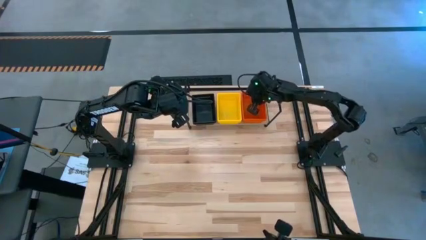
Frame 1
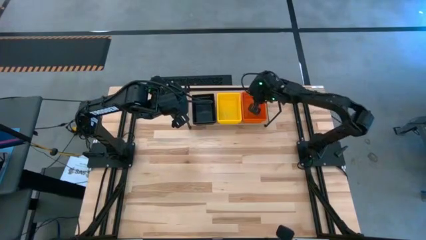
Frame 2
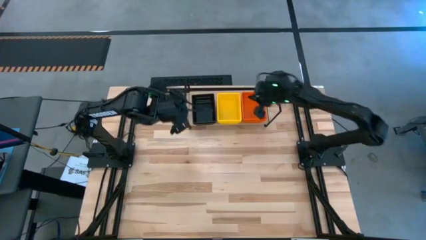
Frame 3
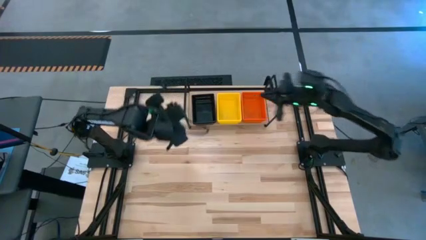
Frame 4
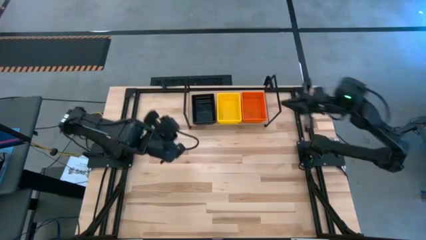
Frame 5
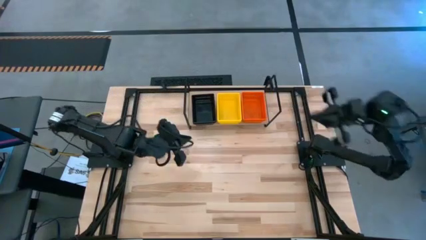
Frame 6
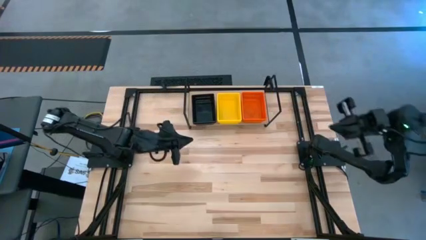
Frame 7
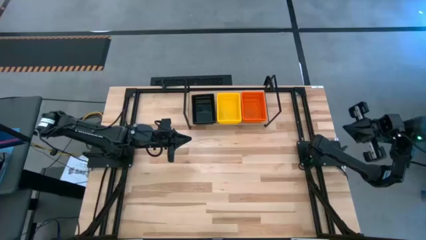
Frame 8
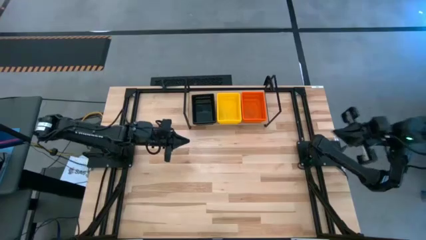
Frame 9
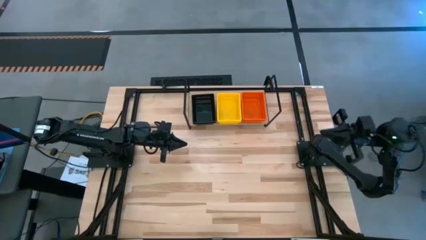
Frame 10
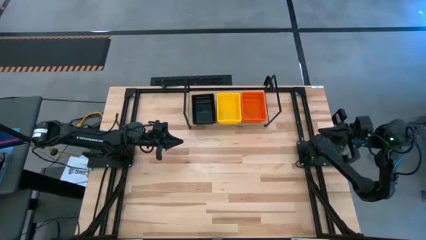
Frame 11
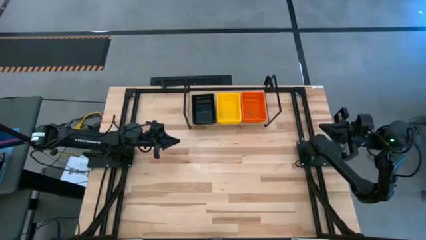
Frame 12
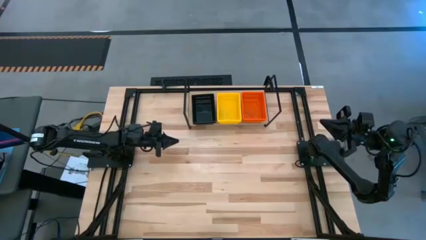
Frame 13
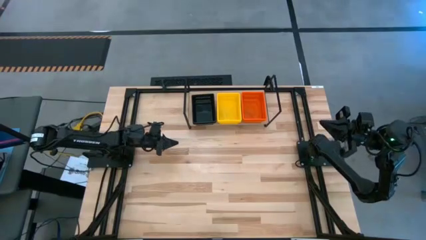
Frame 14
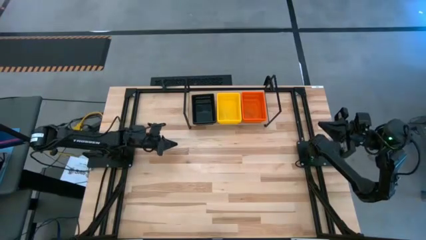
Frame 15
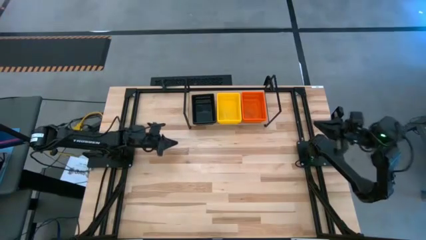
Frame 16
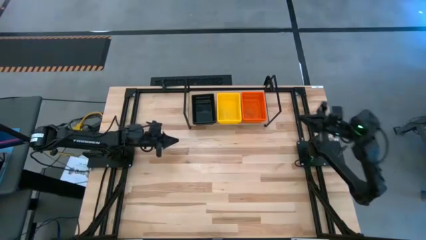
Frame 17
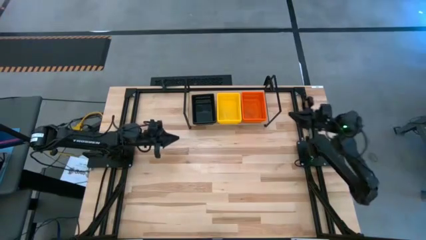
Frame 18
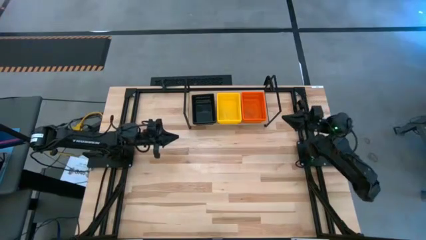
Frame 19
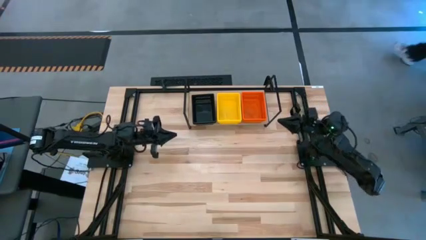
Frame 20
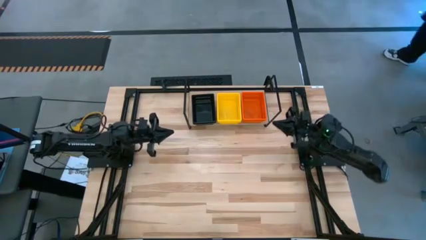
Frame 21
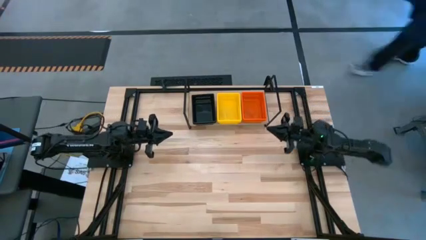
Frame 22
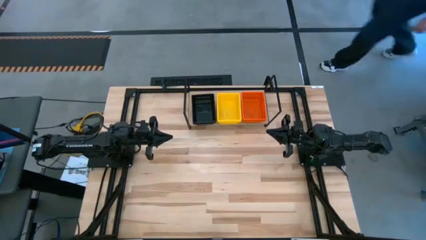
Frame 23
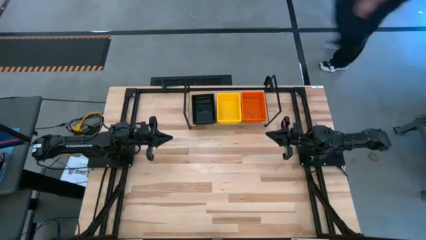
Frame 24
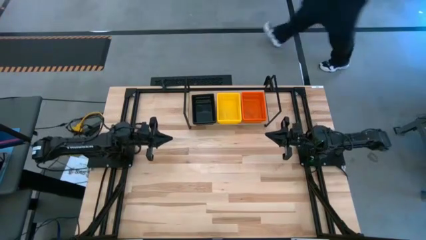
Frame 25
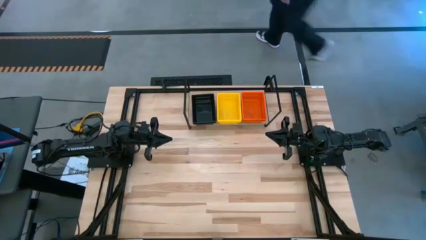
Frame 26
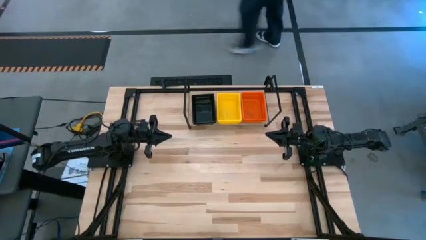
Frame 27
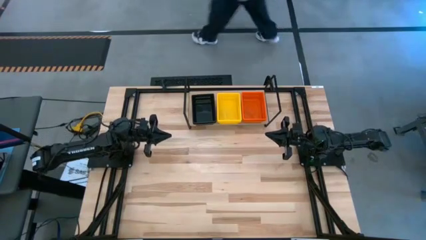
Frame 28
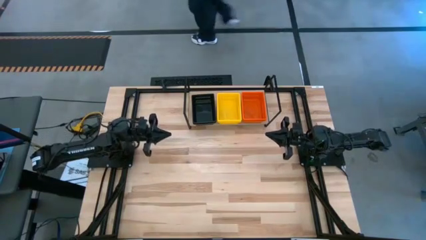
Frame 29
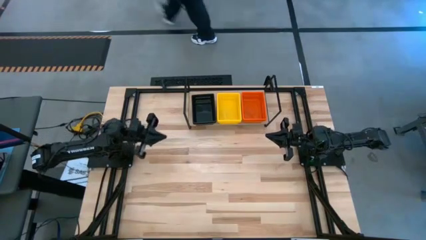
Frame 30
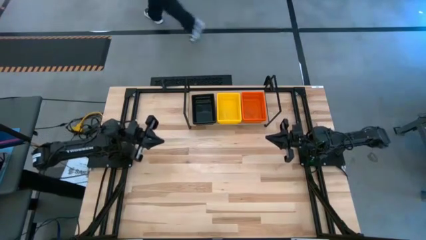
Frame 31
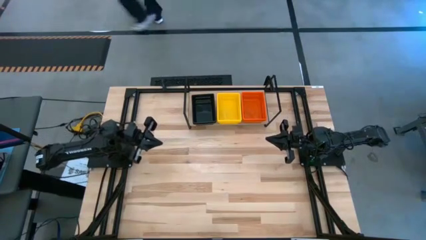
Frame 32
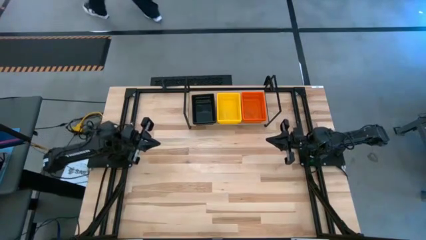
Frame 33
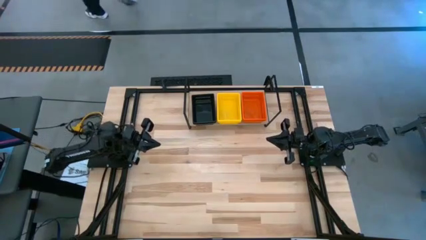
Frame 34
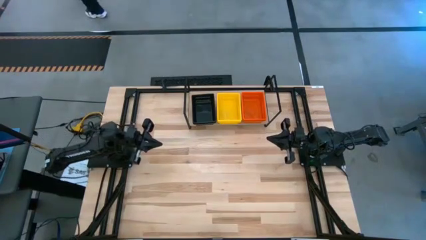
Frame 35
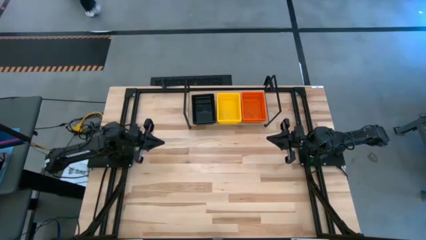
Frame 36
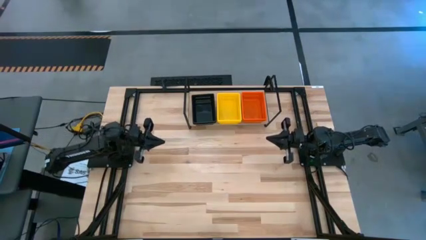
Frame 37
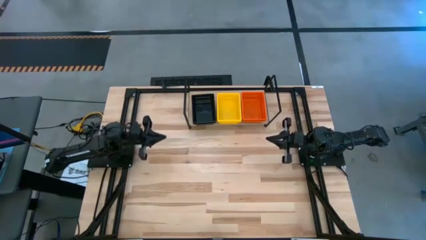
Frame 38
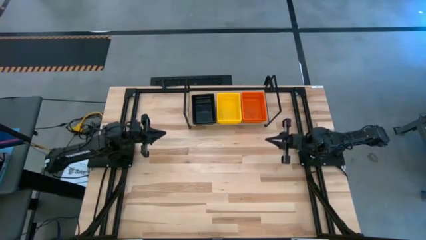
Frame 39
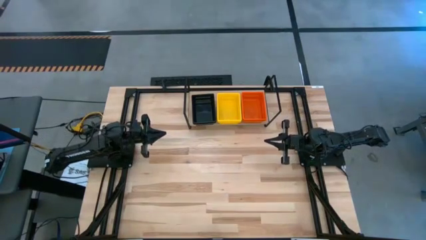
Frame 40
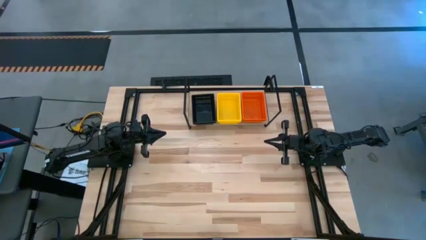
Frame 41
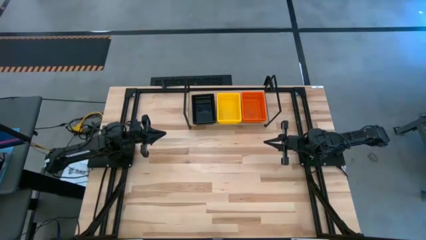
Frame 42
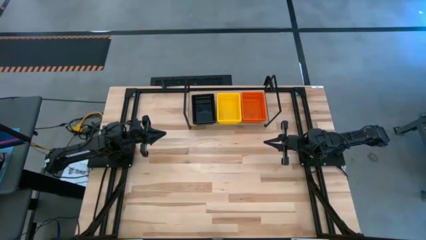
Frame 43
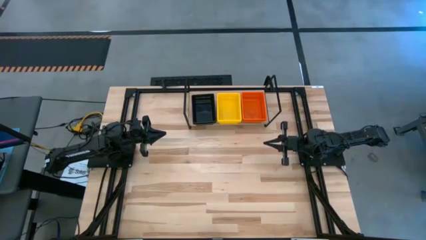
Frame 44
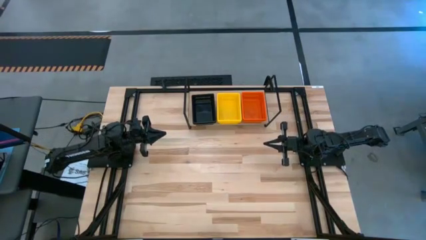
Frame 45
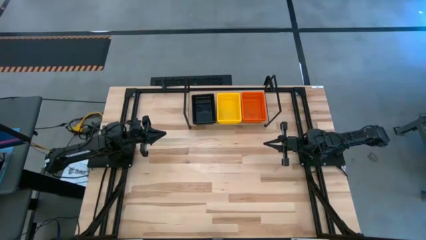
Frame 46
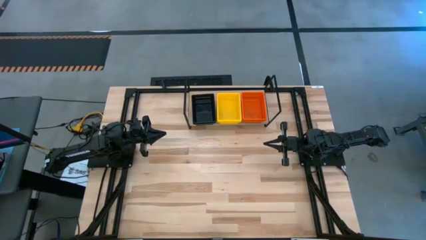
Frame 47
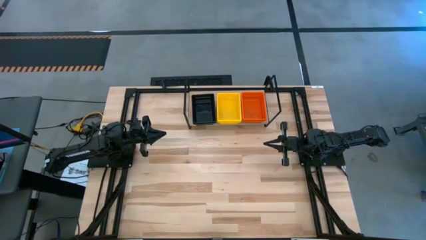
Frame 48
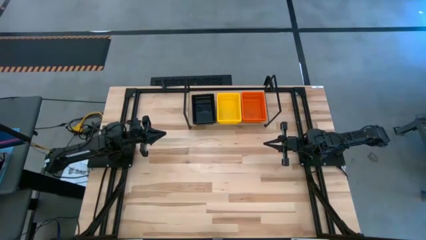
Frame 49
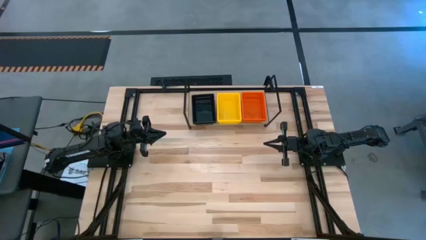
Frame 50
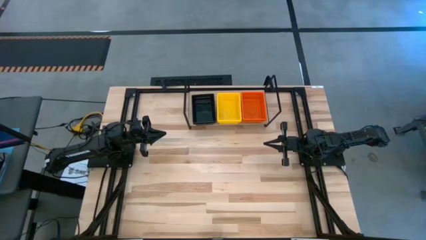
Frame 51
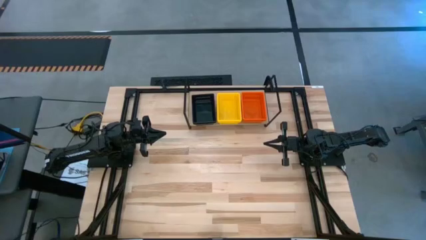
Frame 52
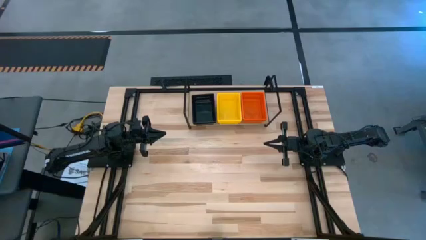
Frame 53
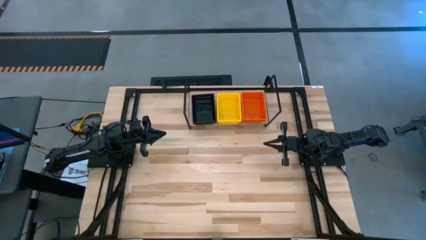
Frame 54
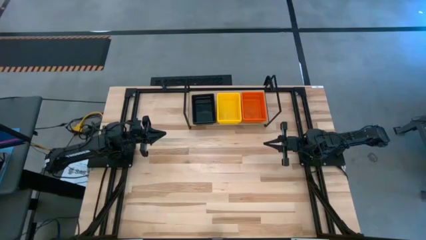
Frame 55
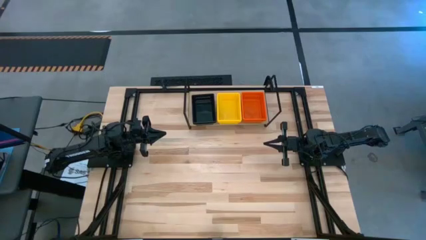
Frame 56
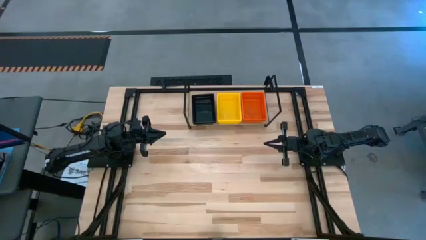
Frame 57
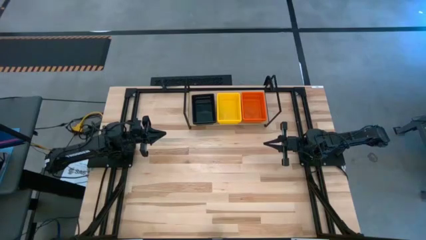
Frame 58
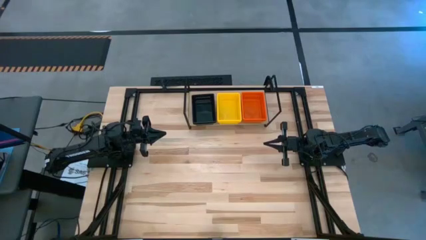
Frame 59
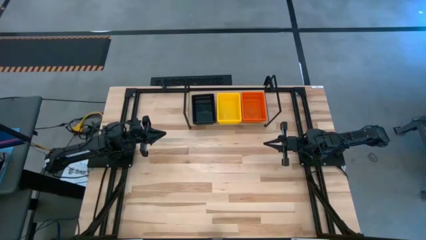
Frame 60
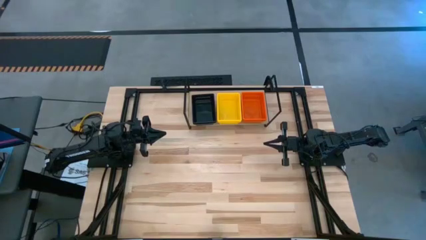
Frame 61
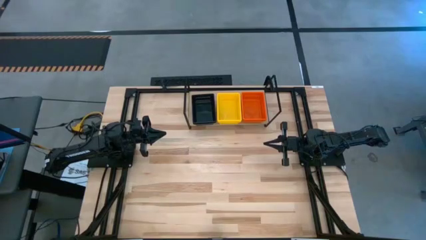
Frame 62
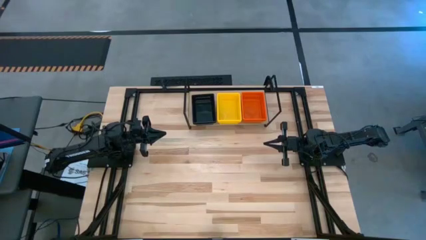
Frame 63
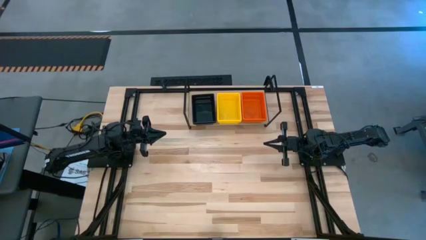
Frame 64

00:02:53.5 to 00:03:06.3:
Task: Stack baskets on shelf by color
Return to Home Position

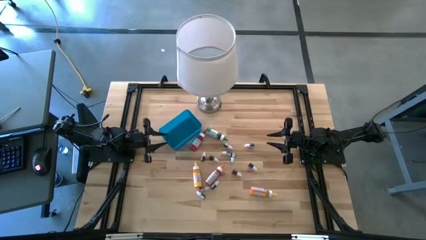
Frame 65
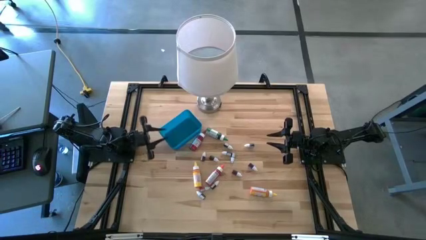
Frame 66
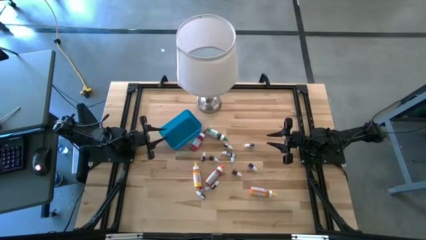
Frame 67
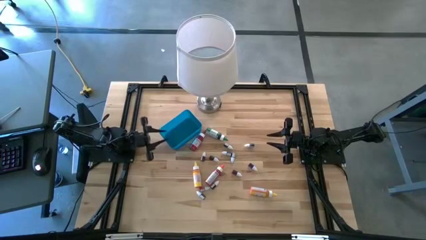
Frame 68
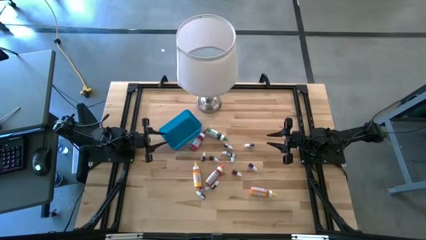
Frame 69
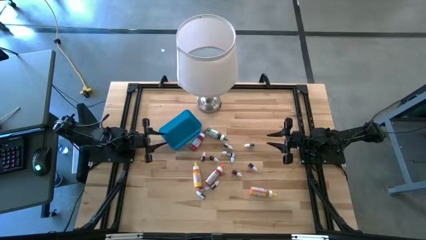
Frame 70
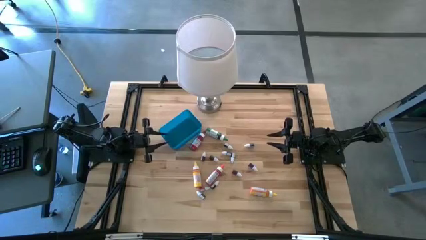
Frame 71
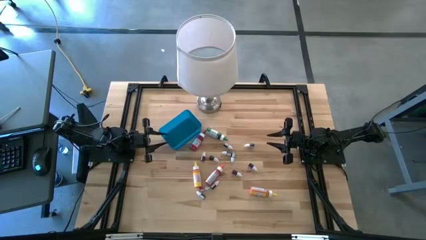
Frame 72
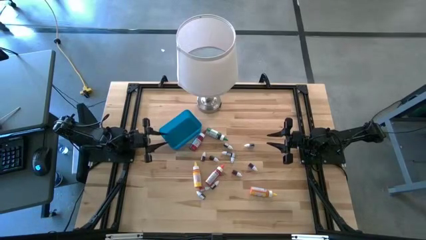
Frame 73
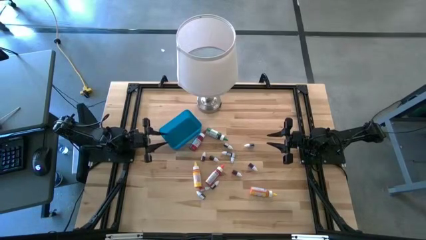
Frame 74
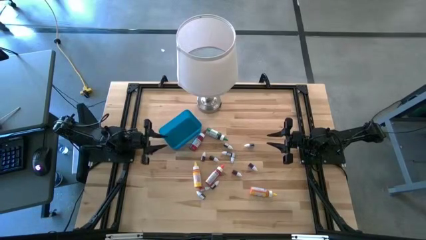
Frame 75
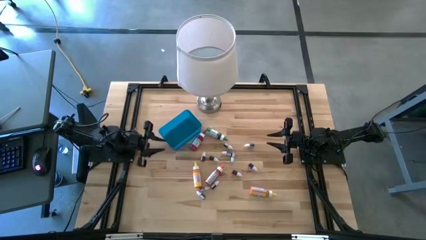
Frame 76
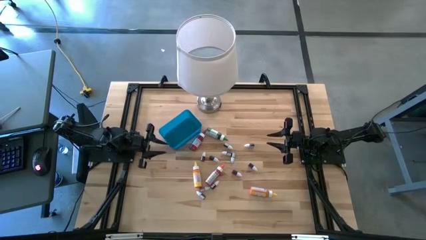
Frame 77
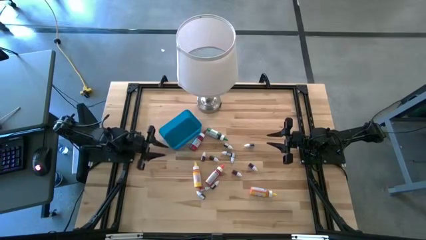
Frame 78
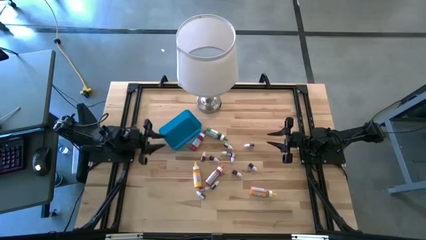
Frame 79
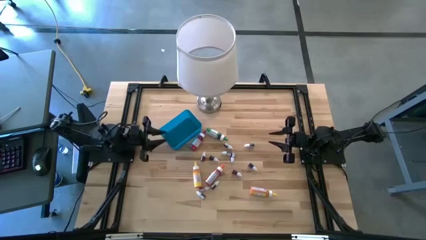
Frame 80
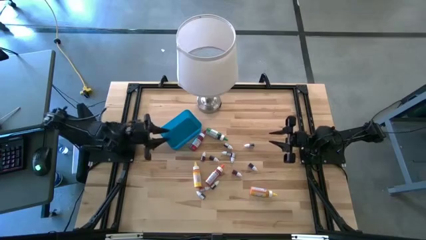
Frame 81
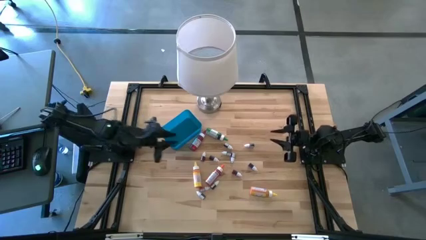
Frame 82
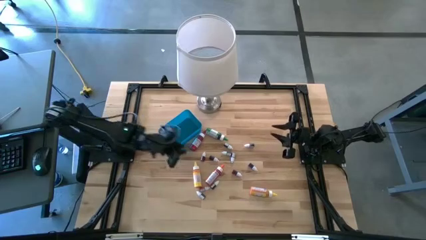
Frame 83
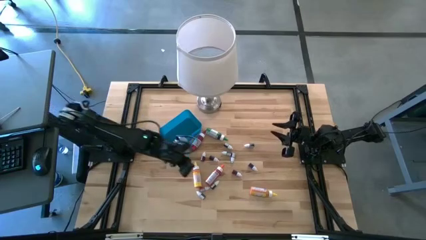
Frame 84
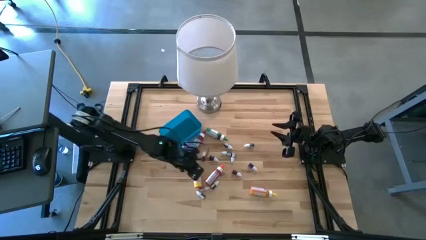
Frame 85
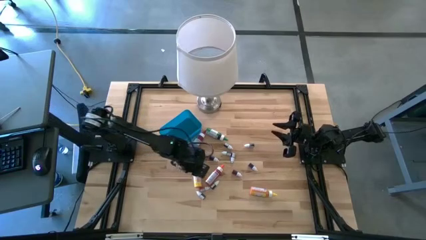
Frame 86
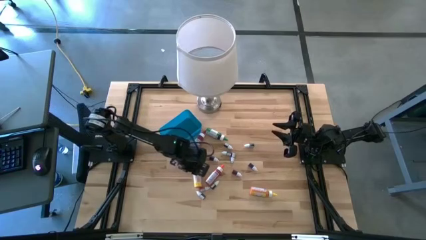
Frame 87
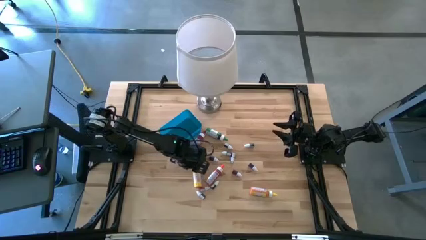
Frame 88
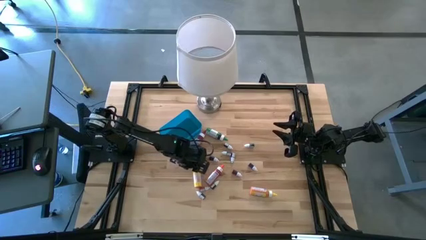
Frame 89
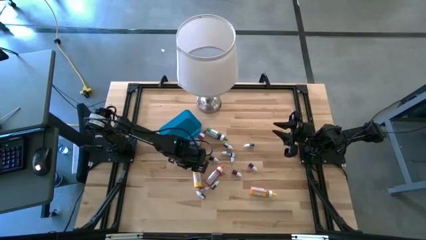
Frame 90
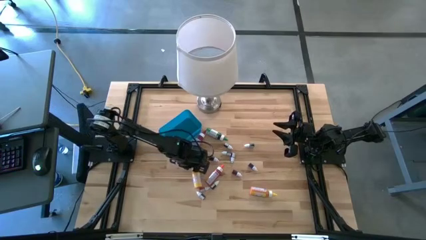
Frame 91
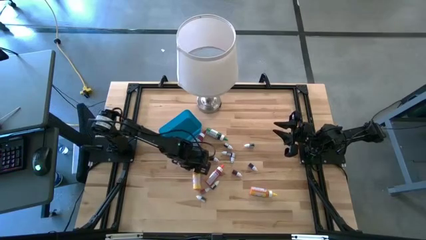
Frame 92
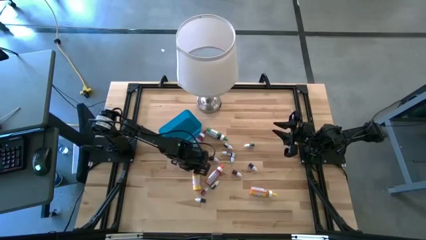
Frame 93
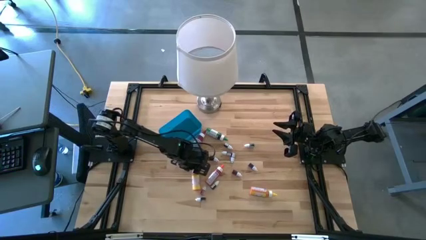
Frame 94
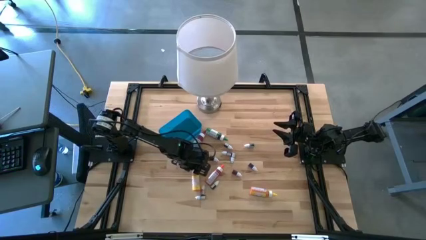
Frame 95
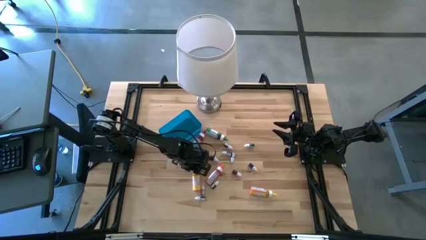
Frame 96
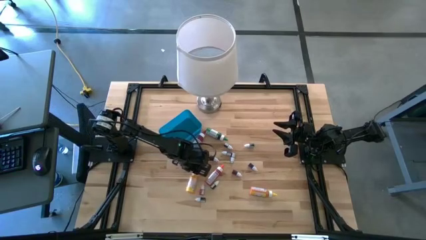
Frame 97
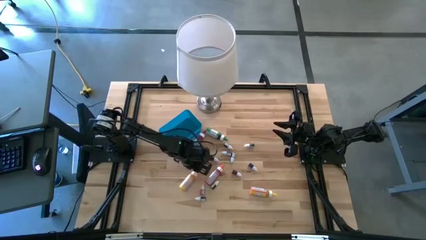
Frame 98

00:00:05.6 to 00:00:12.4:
Task: Pick & Place food coloring
Put the large yellow food coloring bottle into the blue bin
